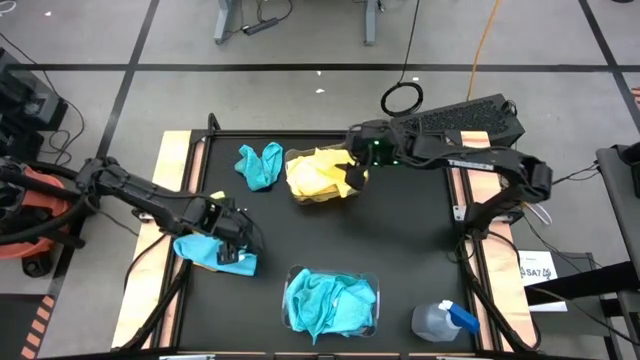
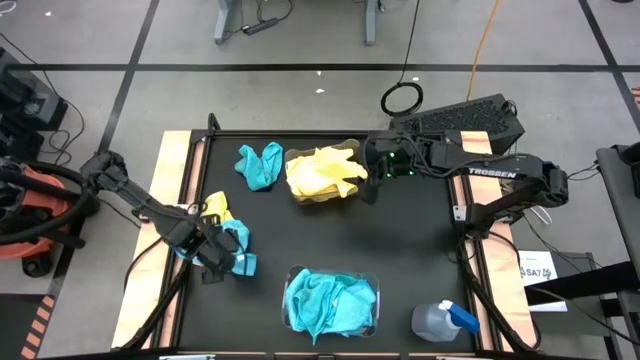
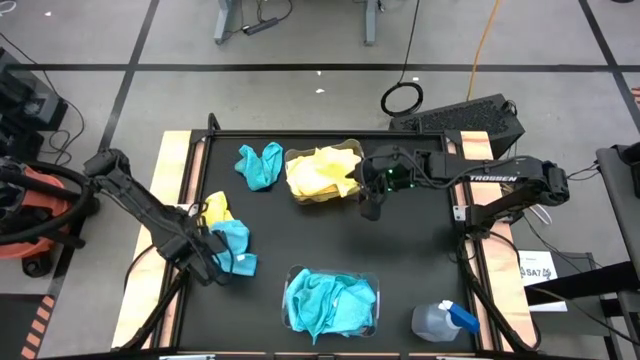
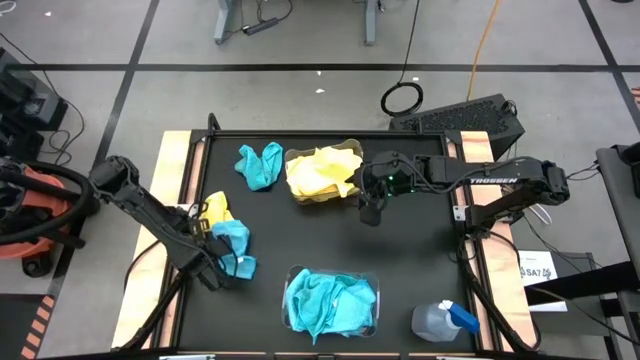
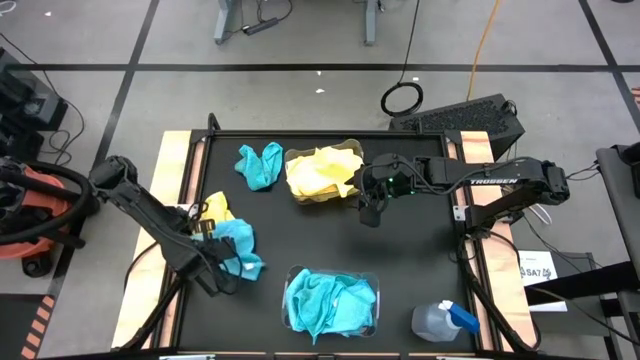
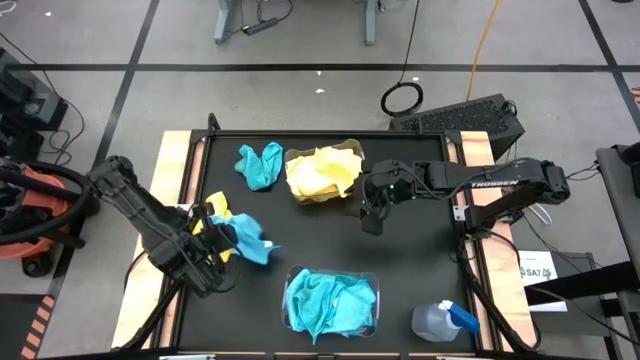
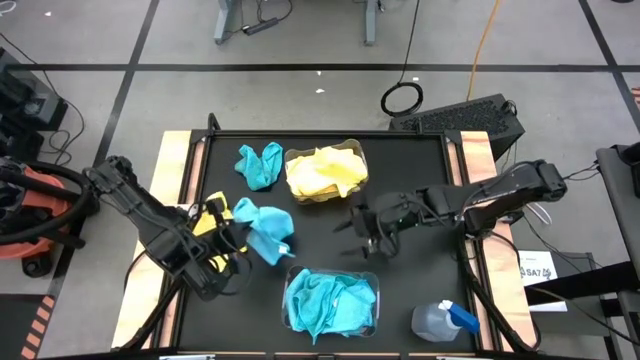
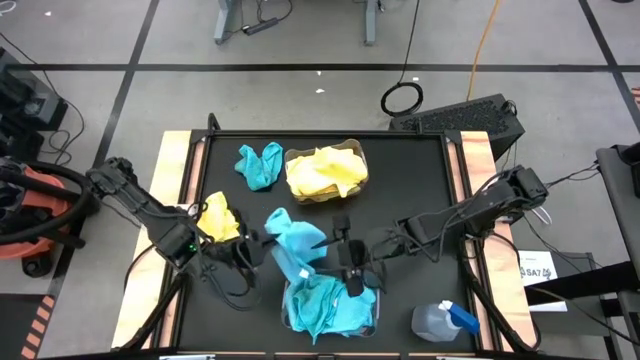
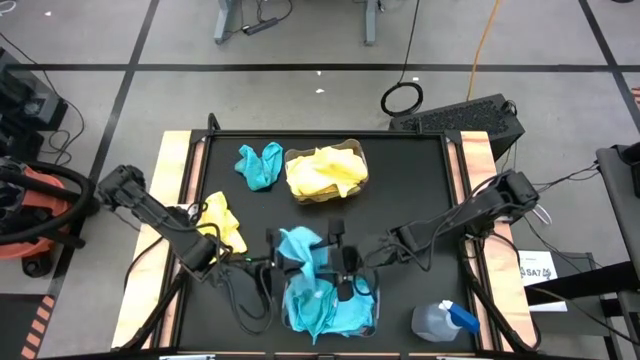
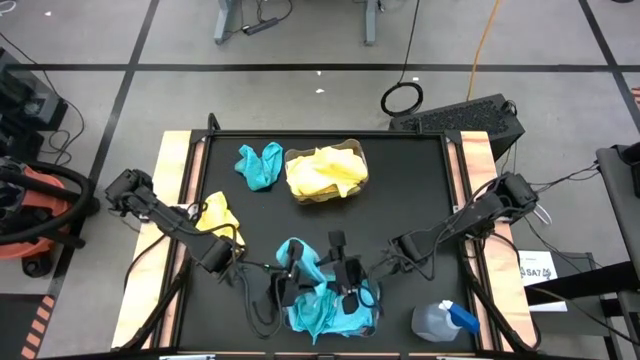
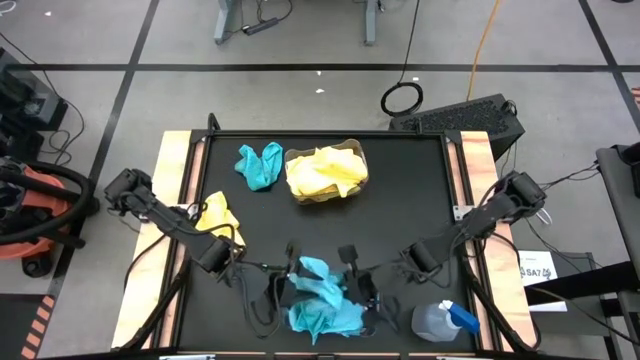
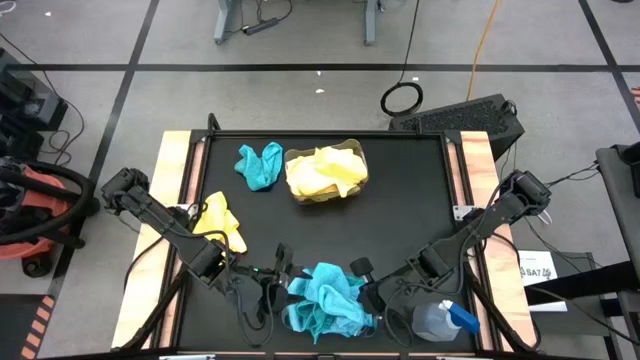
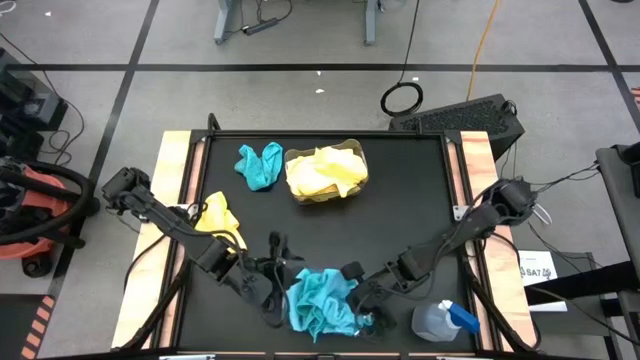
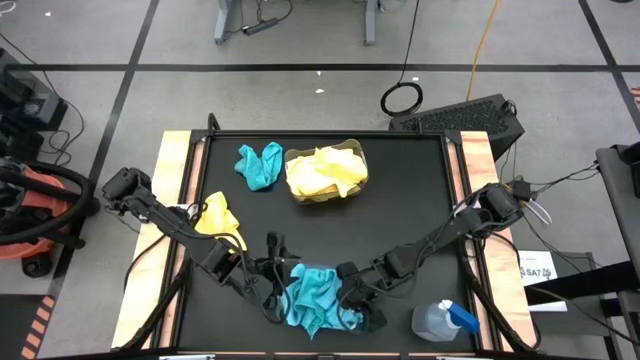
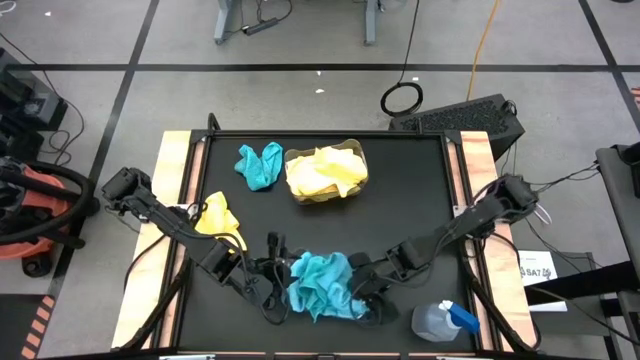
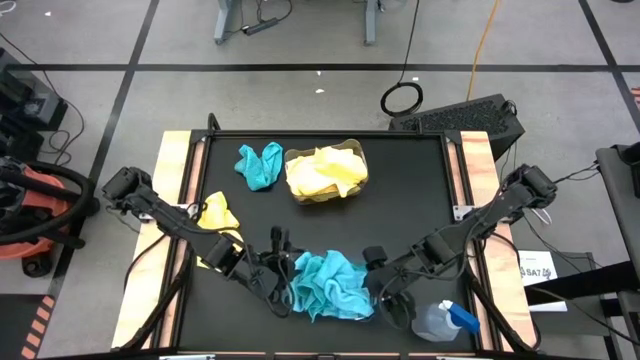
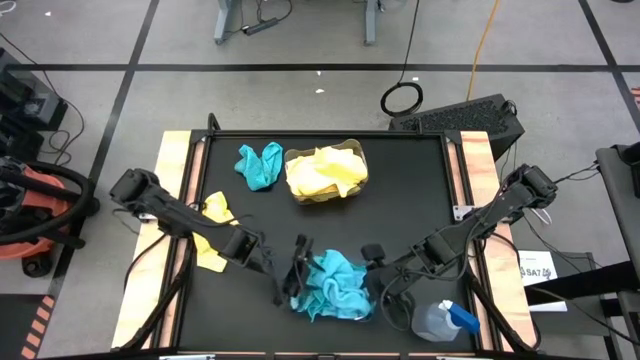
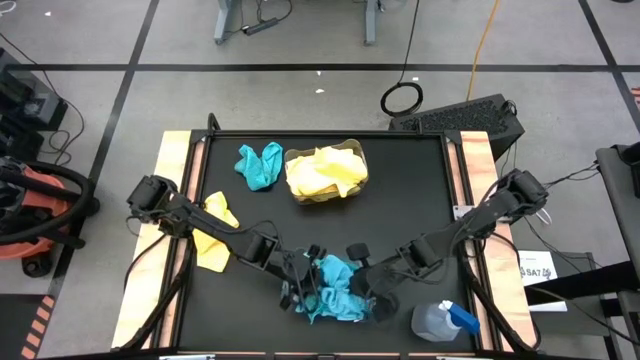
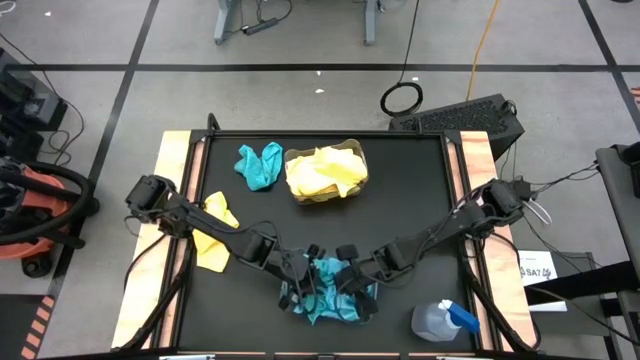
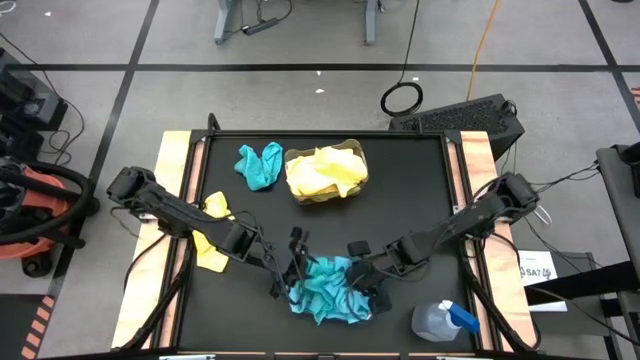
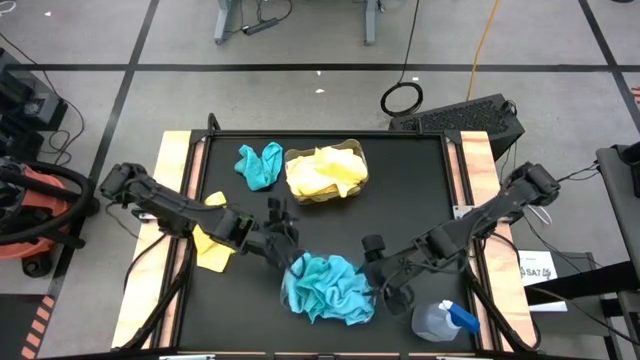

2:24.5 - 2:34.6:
Task: Sort microfiber towel by color & place in baskets
Put the blue towel into the bottom transparent bin

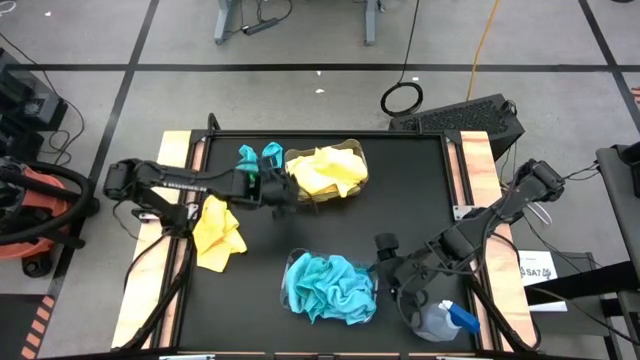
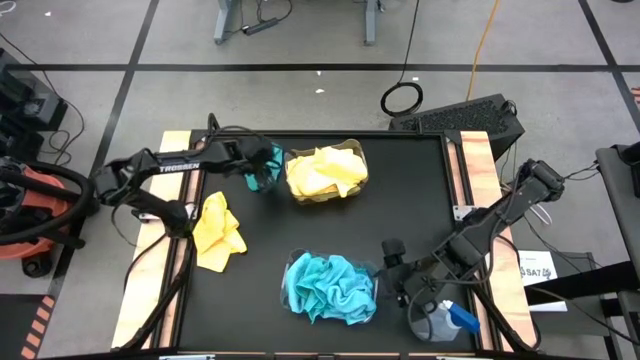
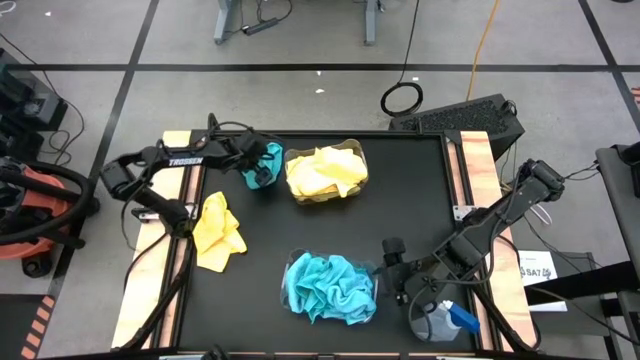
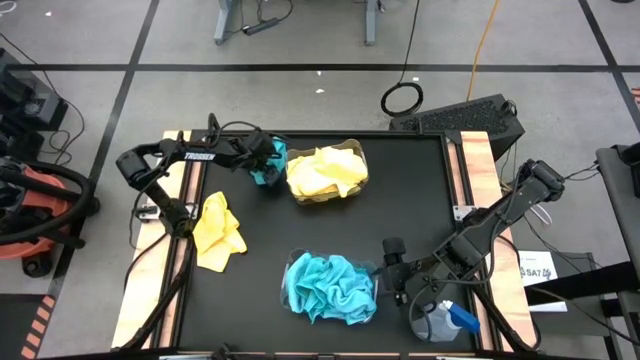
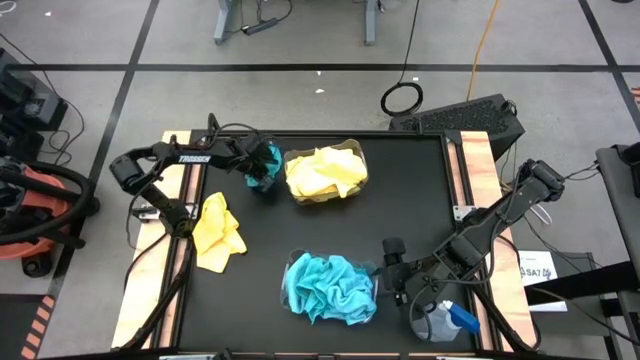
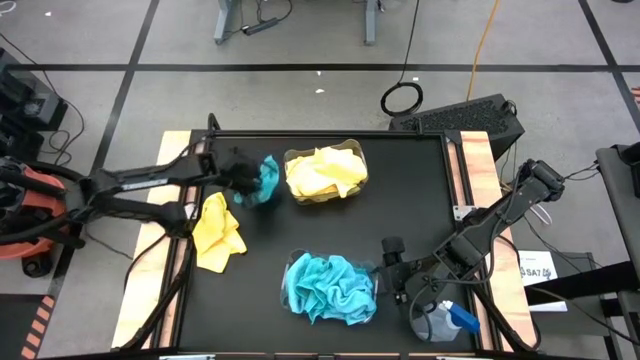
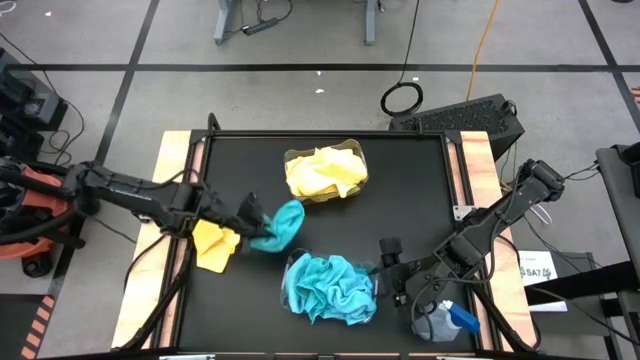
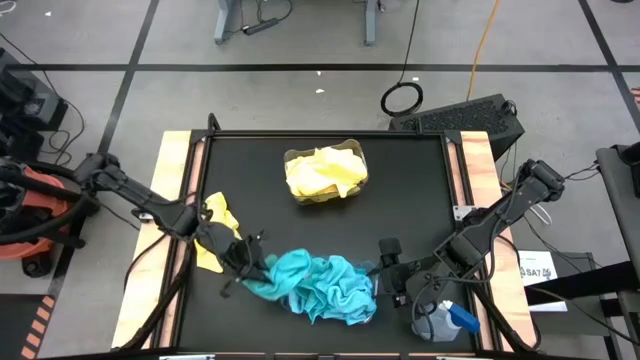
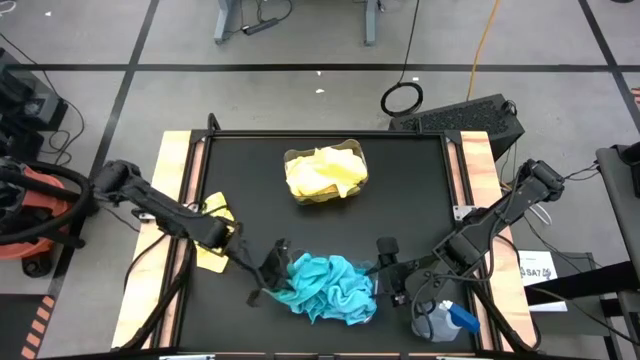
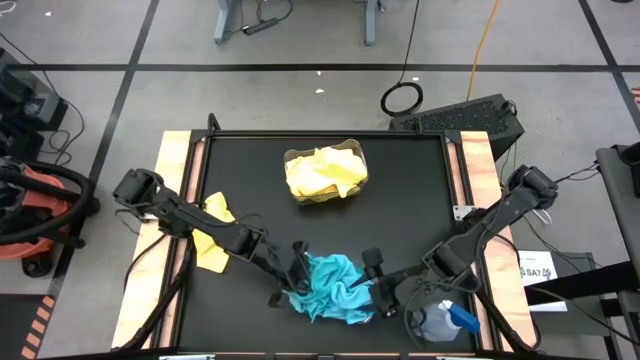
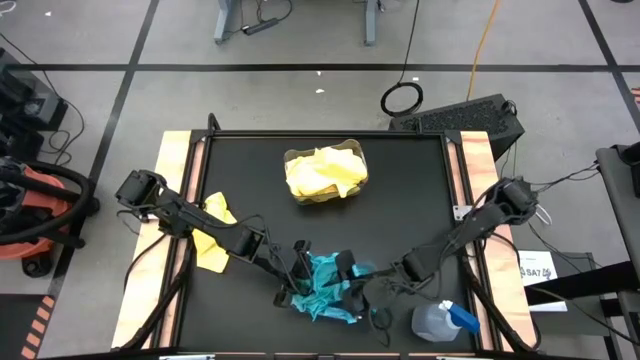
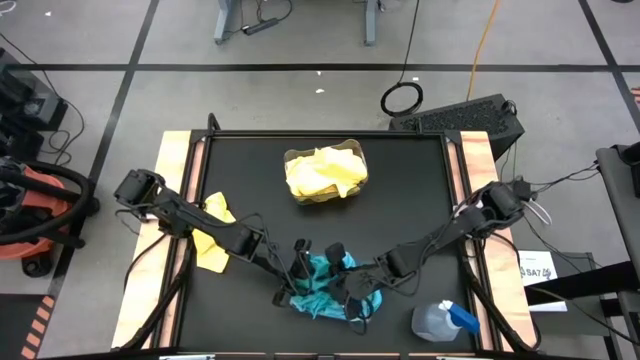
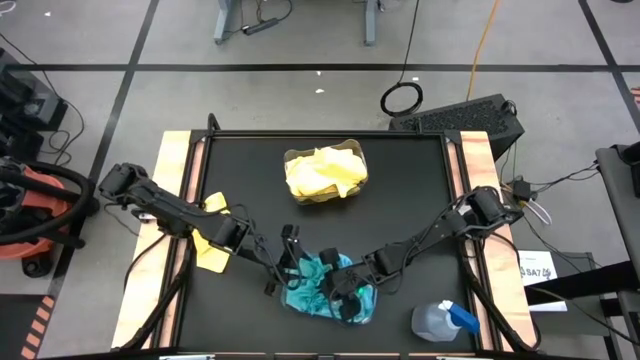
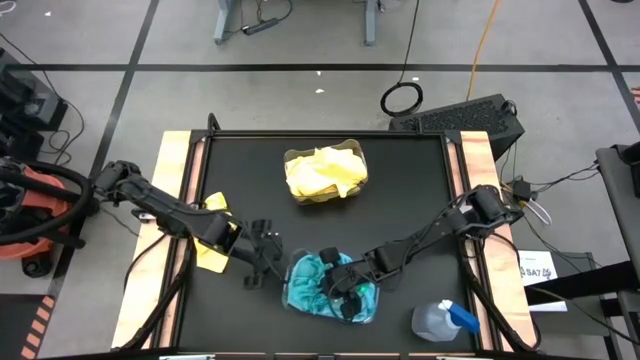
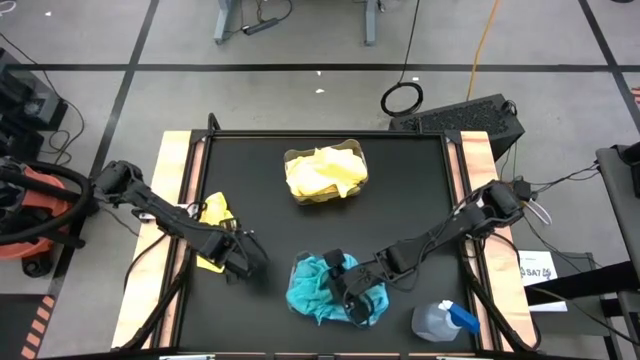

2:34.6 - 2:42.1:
Put the blue towel into the bottom transparent bin

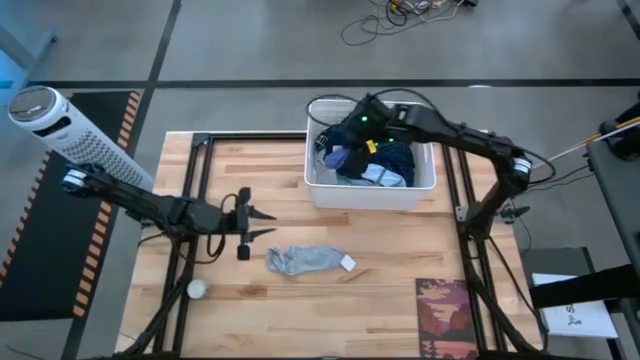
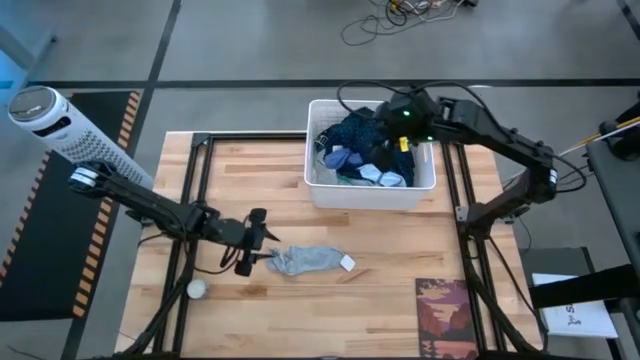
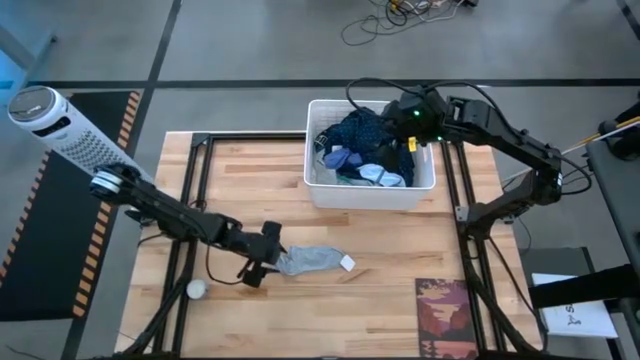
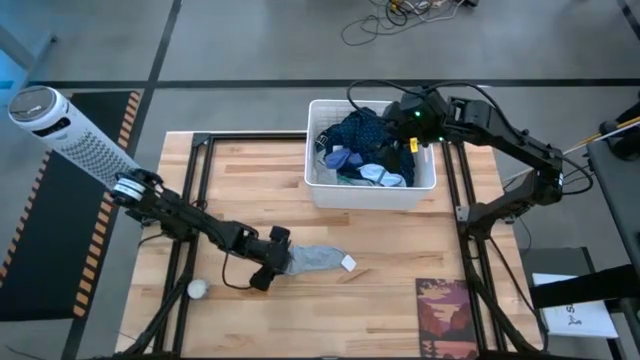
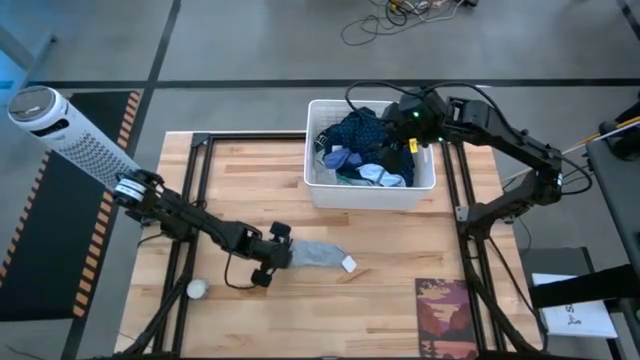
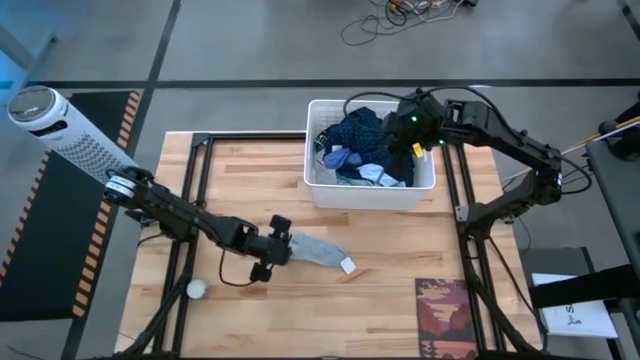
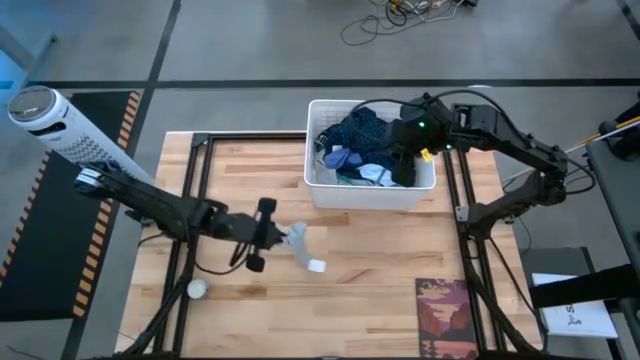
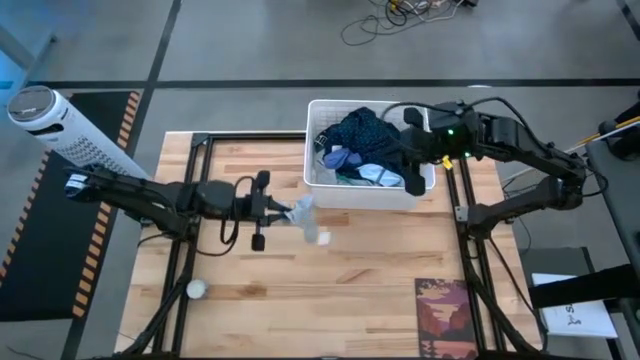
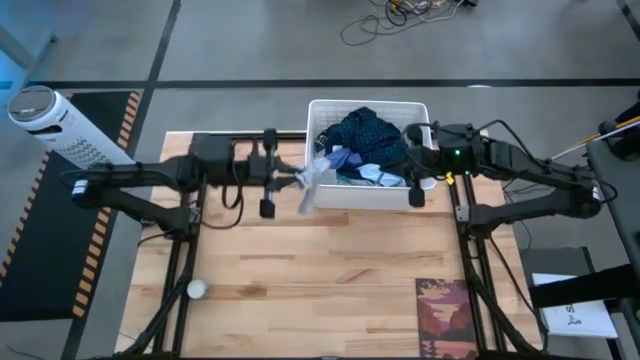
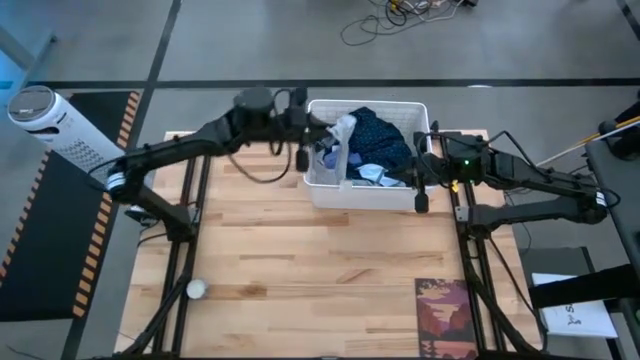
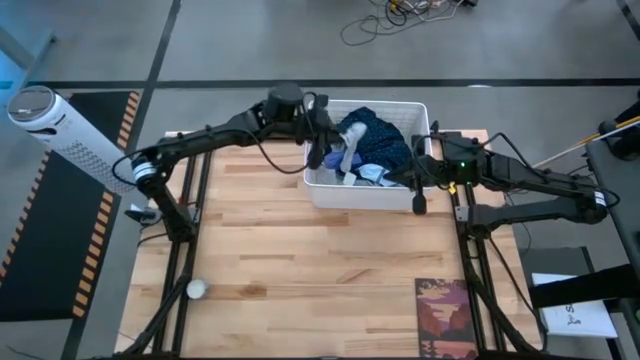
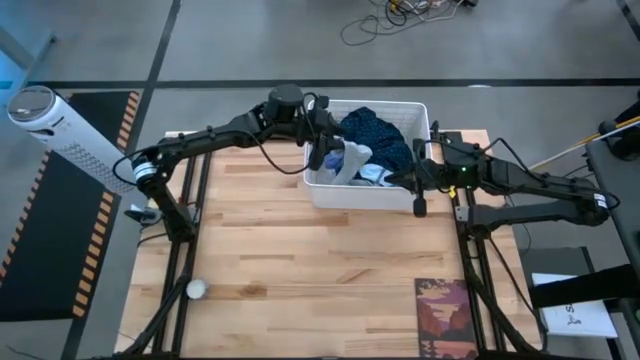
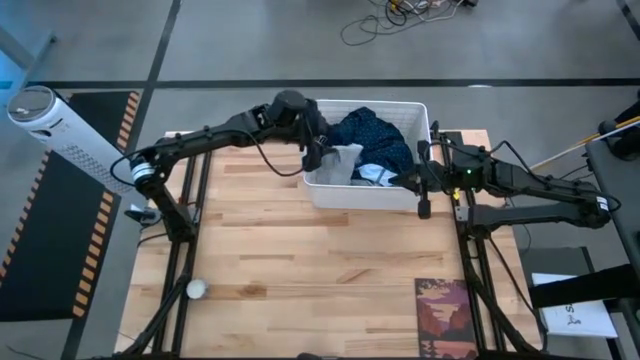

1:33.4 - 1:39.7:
Task: Sort clothes
Put the gray sock into the white laundry bin
